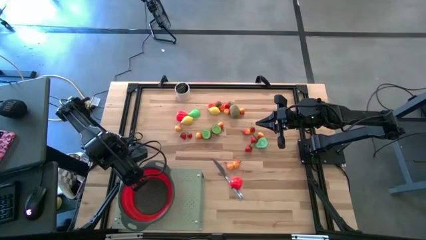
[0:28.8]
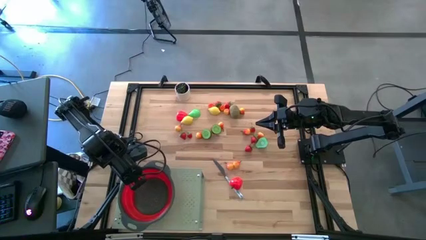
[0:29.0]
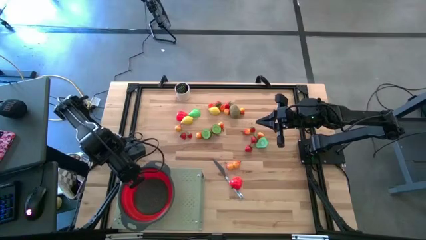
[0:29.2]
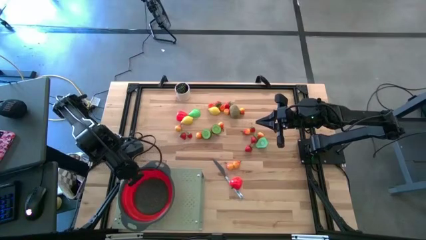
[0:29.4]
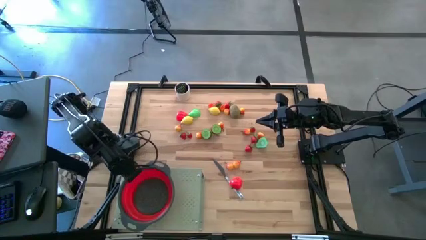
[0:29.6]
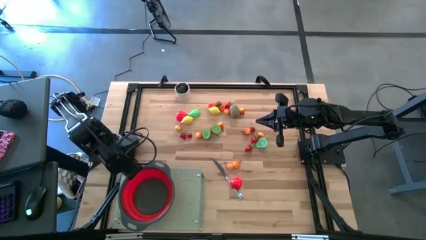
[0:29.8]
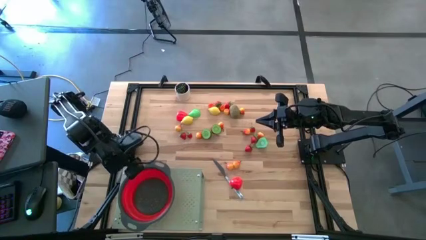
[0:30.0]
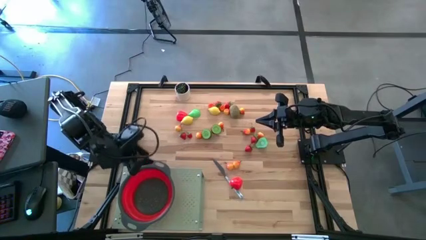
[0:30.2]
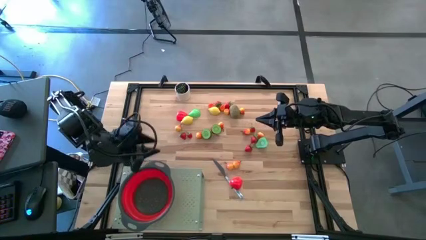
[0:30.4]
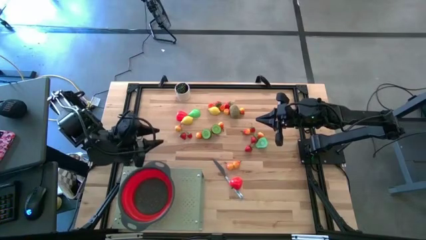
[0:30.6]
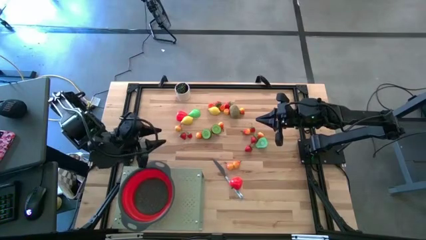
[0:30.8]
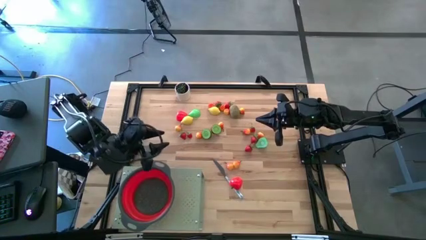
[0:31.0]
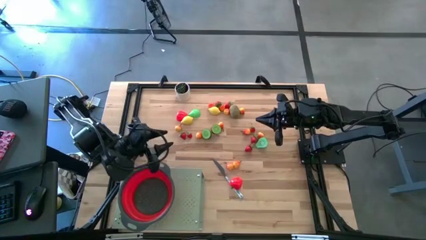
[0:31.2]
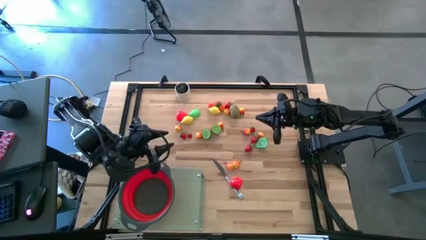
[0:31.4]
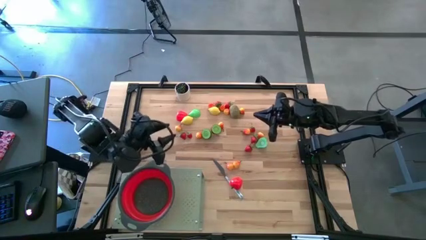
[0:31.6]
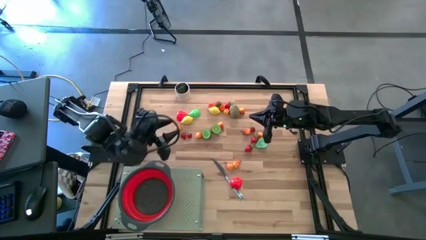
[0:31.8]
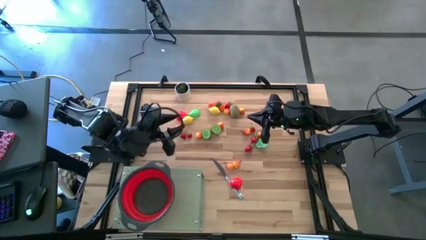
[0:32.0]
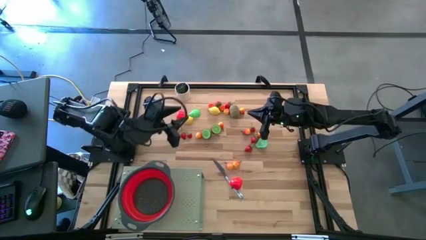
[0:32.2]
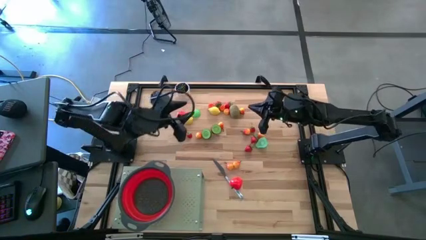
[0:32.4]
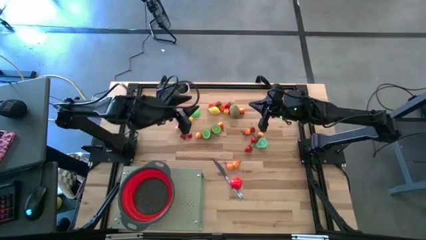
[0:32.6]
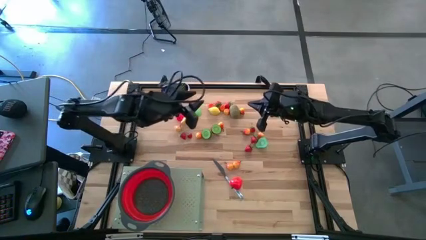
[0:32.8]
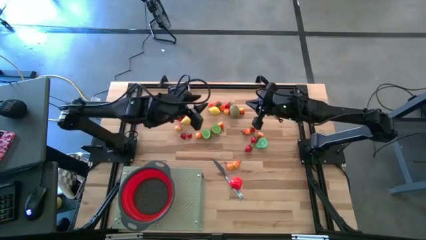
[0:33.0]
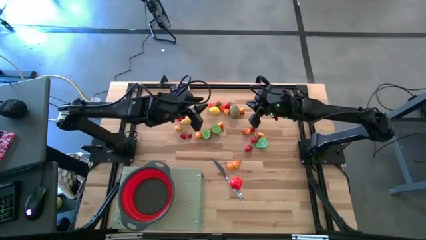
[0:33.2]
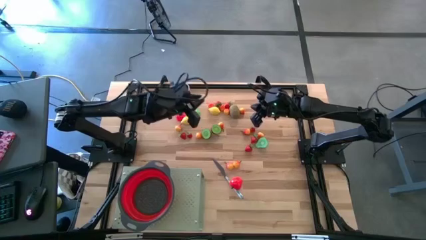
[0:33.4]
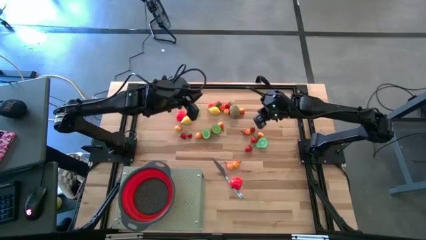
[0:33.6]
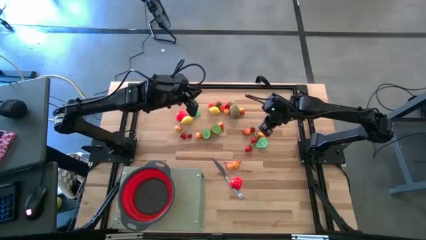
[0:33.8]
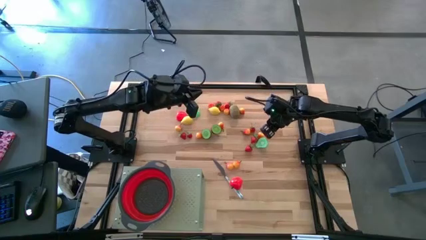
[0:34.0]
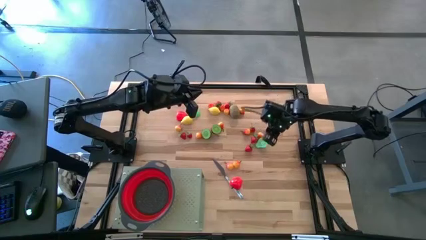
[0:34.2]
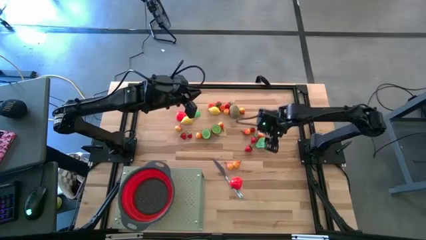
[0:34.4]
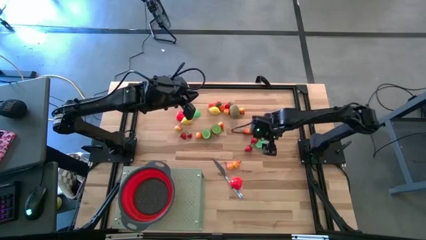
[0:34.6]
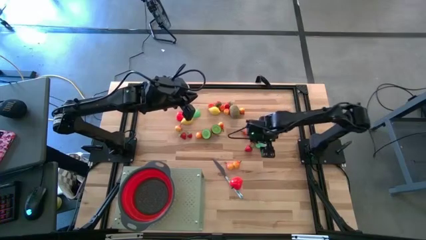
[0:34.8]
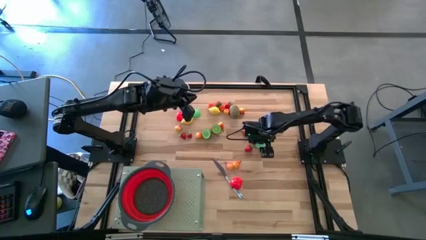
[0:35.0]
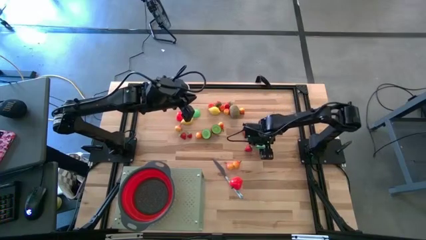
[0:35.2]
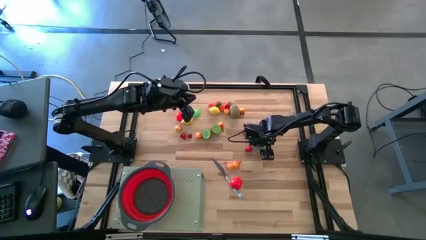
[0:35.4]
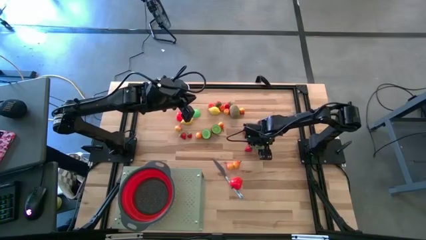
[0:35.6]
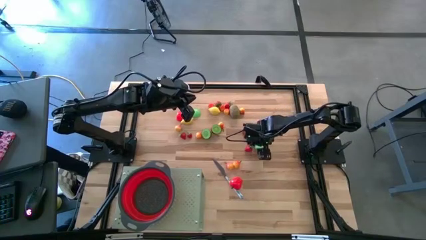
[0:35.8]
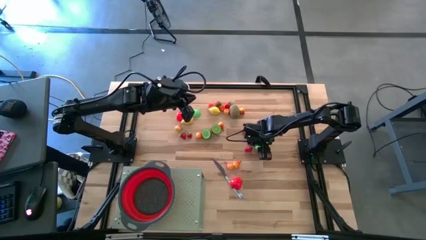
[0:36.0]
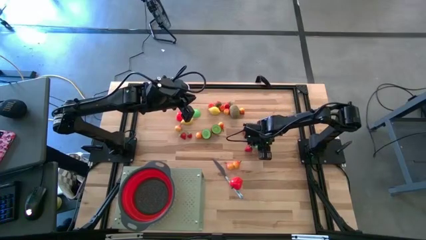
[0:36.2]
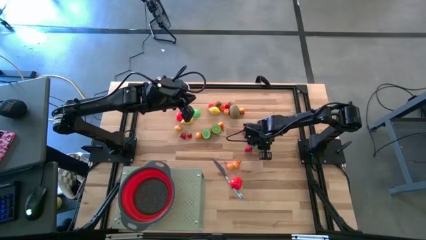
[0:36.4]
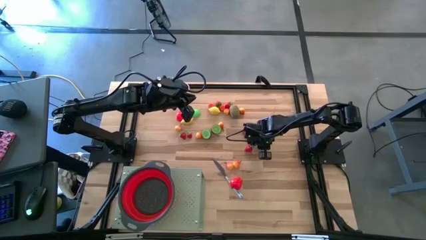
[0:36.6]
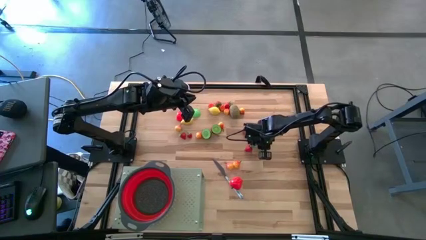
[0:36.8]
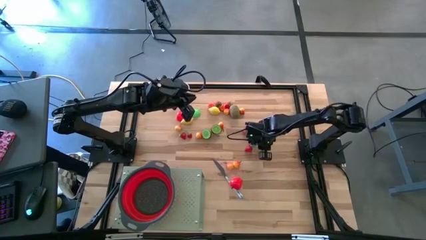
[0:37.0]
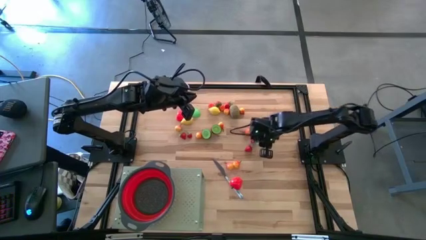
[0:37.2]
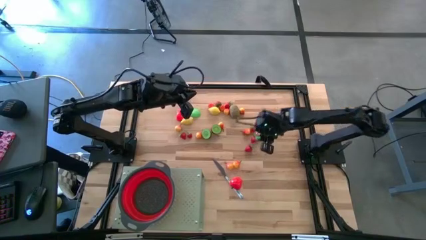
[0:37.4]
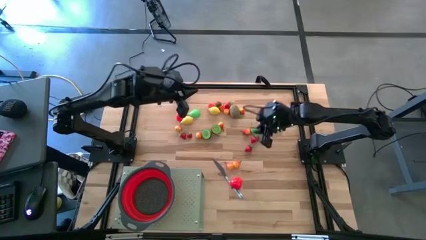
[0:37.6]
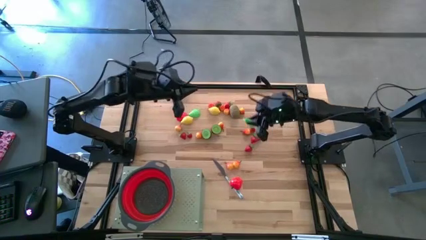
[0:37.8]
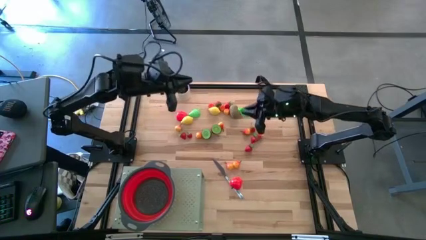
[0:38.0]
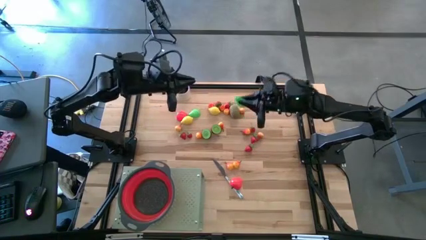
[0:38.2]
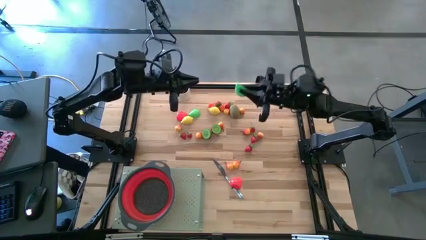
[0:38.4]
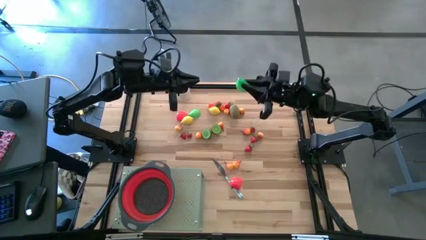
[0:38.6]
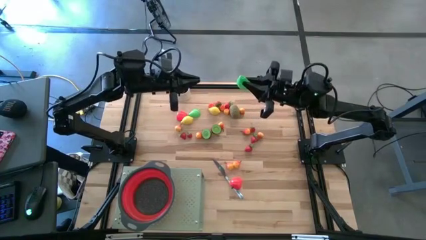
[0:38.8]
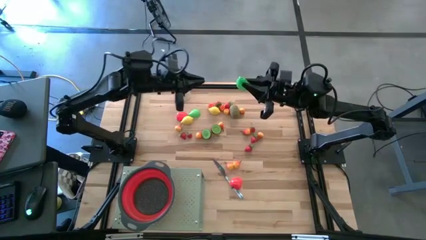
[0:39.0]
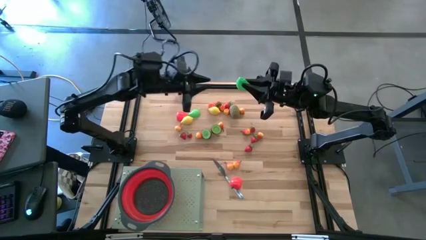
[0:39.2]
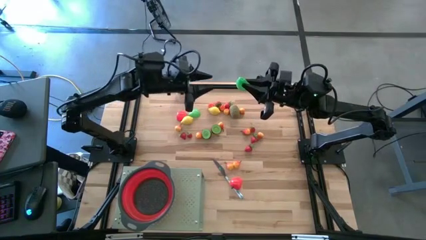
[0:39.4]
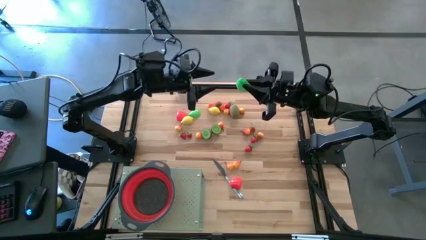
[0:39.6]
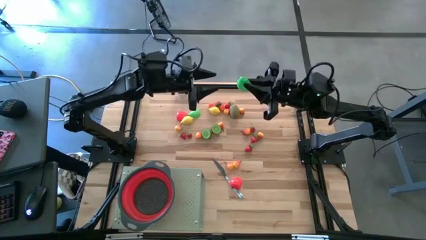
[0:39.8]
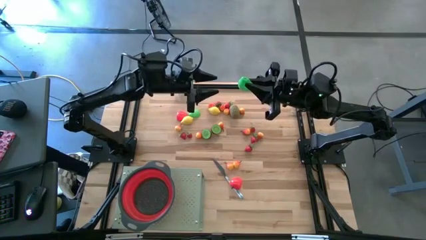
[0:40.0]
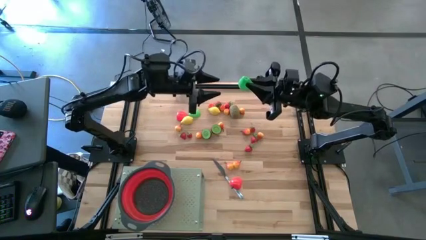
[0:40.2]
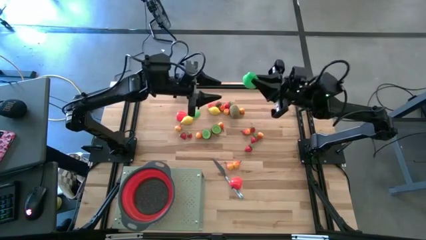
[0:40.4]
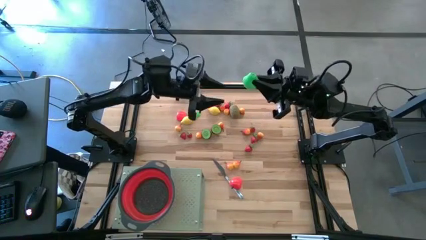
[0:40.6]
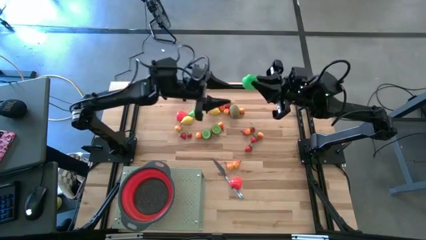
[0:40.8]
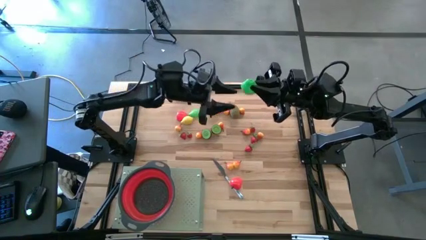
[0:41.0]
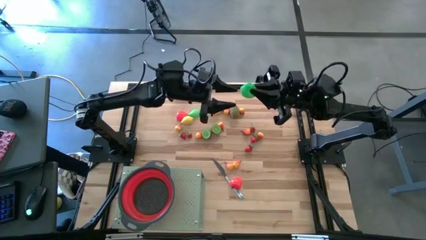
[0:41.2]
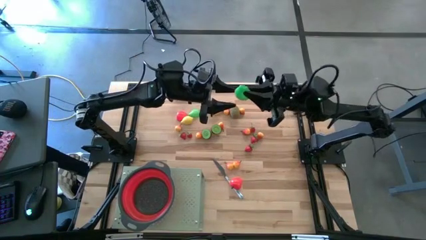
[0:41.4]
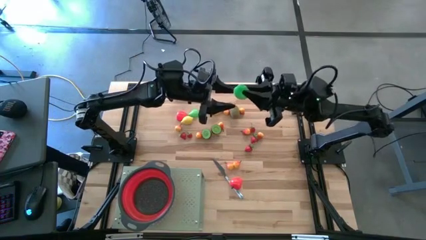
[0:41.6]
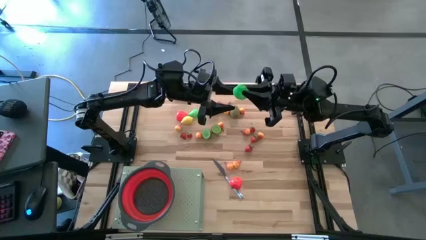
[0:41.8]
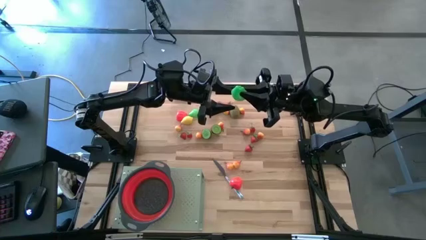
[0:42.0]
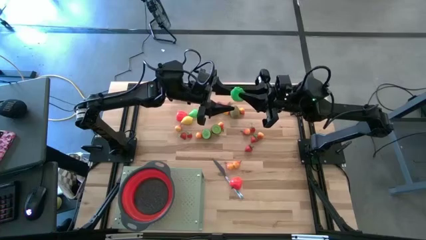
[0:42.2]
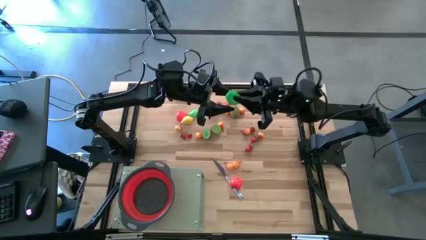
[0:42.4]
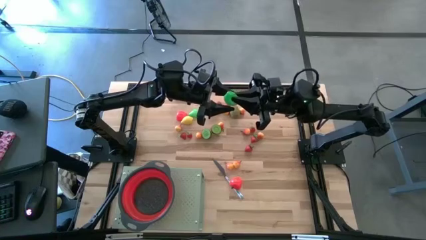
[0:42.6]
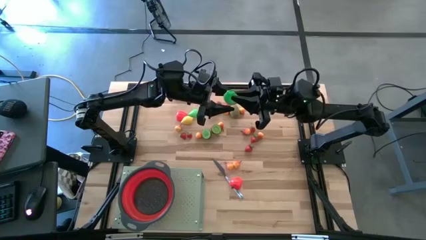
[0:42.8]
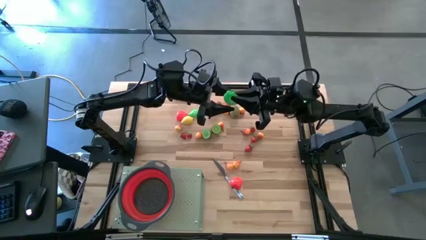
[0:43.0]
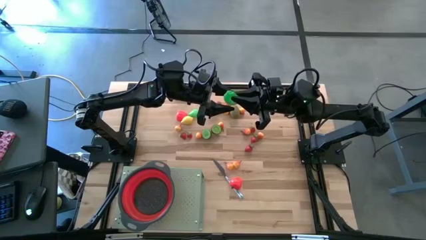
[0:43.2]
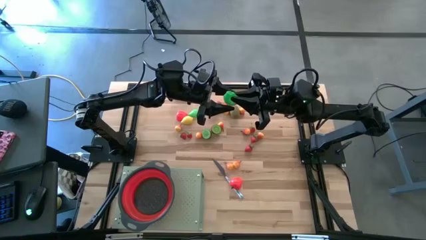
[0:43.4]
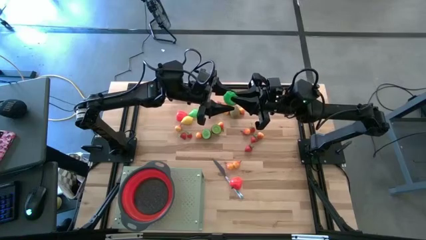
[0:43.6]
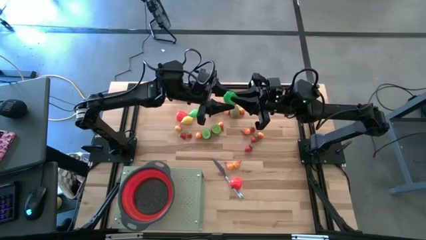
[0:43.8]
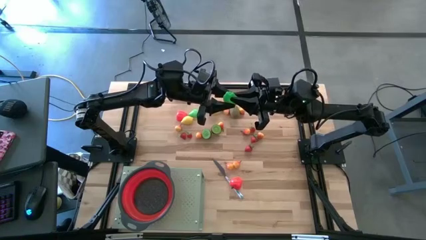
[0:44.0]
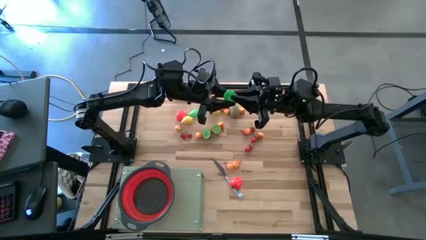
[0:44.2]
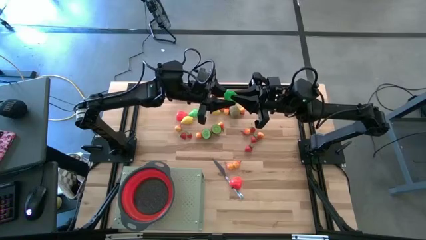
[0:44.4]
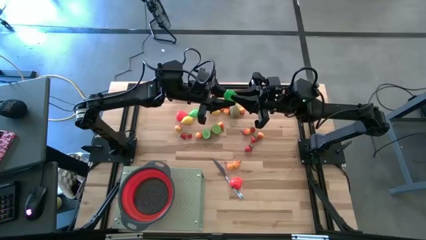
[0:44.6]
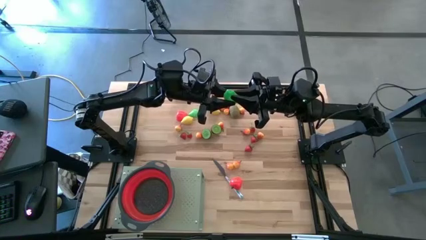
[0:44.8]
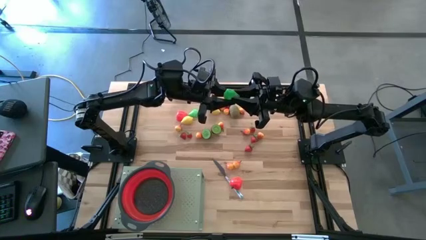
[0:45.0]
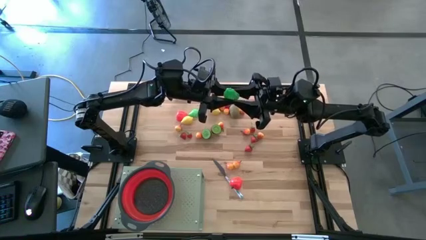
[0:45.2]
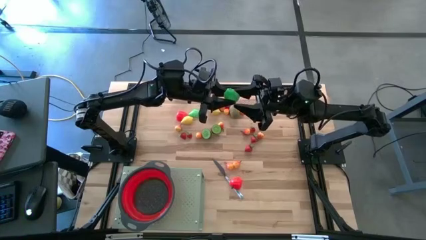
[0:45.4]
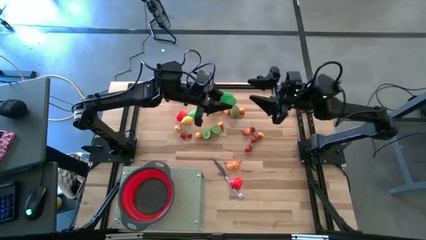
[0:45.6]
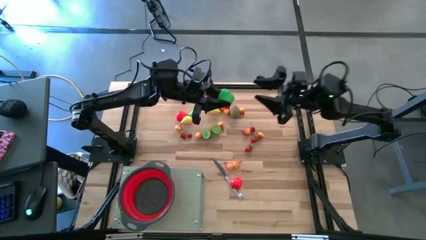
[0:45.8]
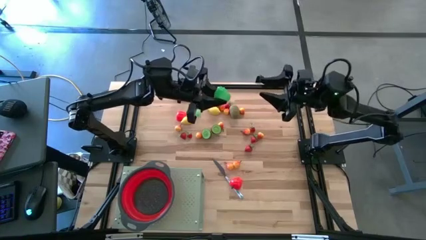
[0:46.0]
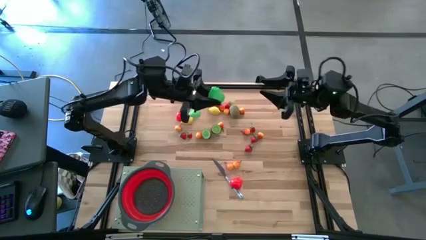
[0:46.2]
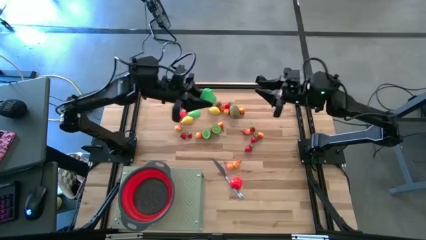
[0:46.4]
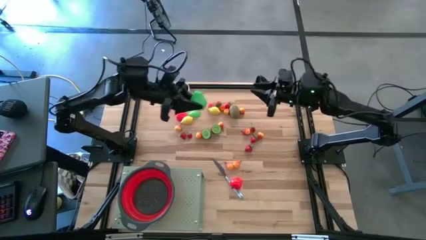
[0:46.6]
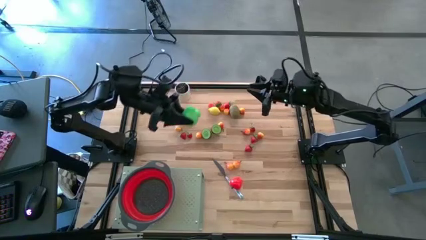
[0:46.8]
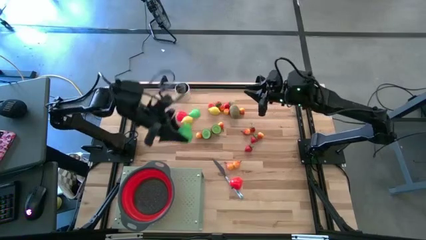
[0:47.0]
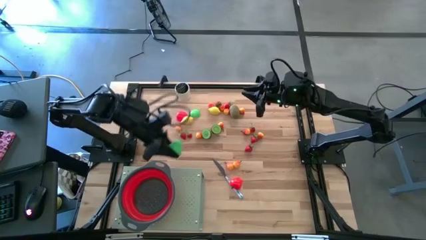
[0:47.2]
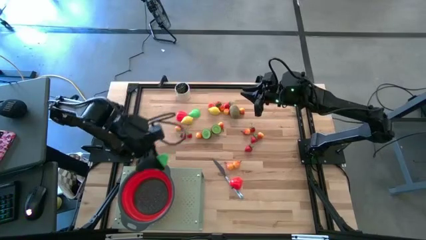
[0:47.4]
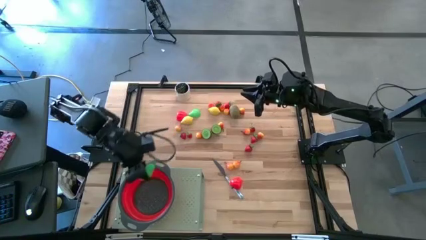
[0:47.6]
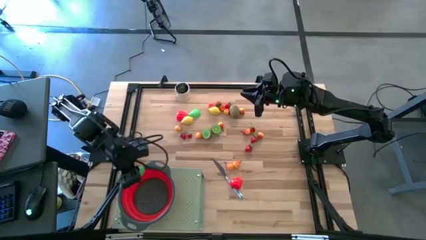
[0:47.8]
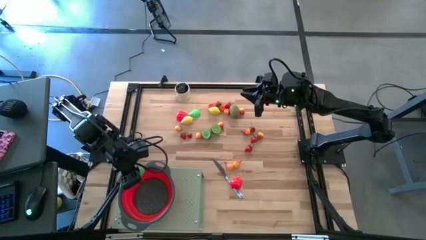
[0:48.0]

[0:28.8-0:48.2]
Task: Pick & Place Fruit
Put the half avocado into the red strainer bowl on the shelf
